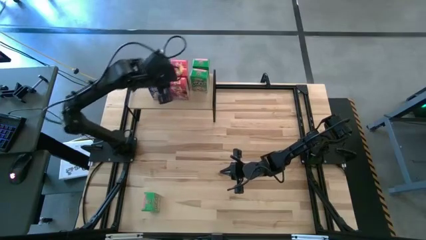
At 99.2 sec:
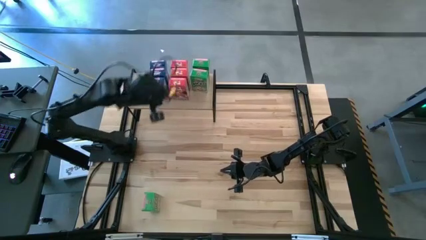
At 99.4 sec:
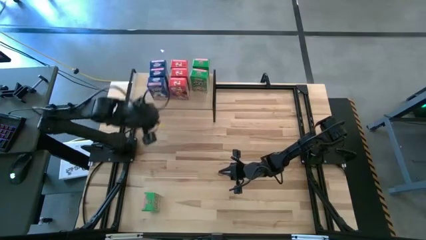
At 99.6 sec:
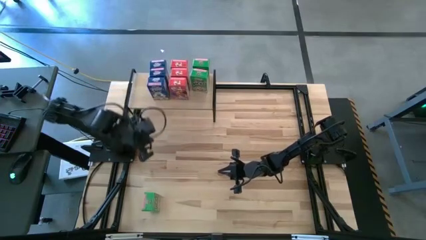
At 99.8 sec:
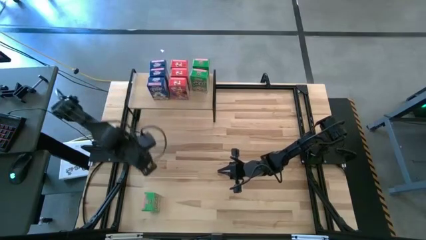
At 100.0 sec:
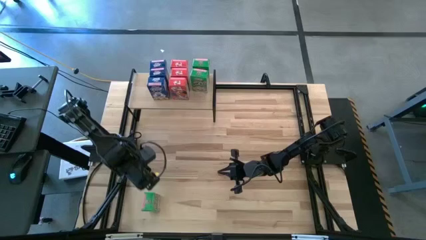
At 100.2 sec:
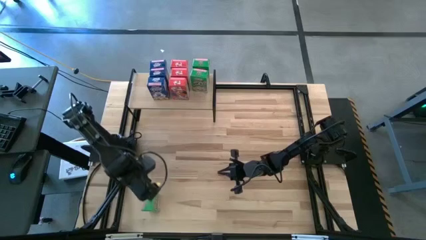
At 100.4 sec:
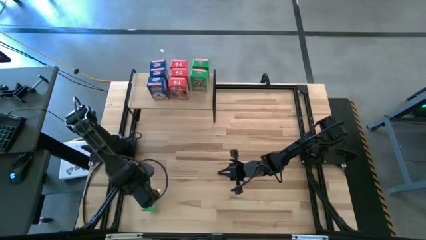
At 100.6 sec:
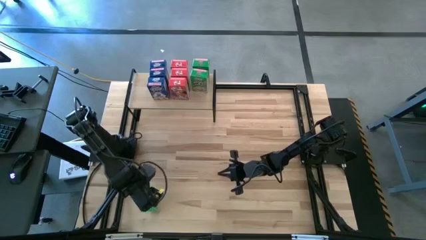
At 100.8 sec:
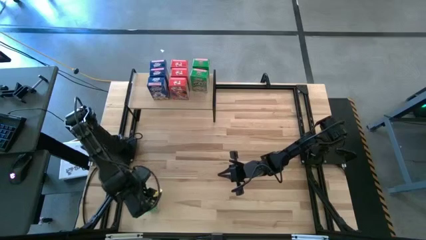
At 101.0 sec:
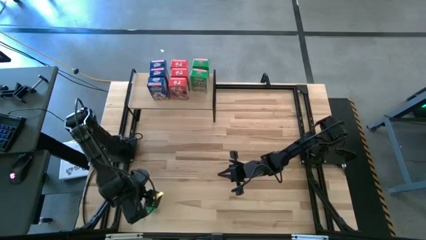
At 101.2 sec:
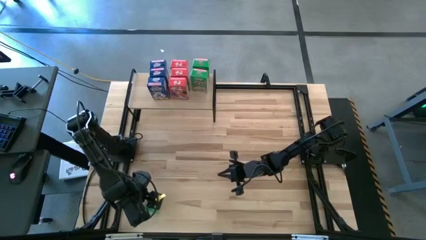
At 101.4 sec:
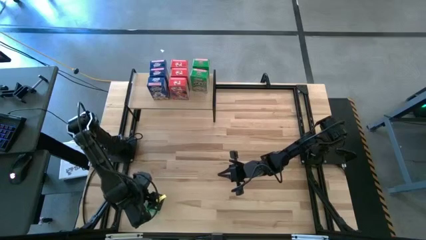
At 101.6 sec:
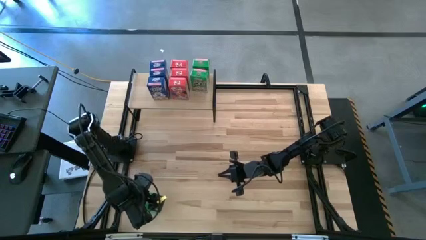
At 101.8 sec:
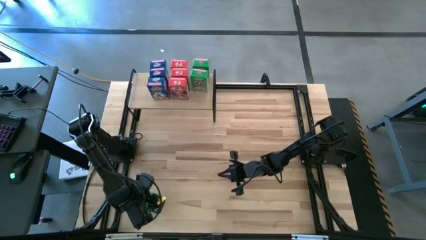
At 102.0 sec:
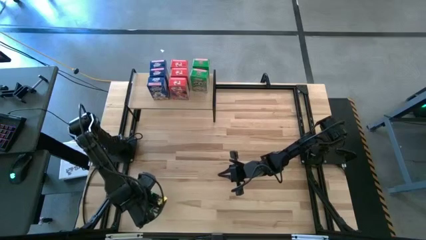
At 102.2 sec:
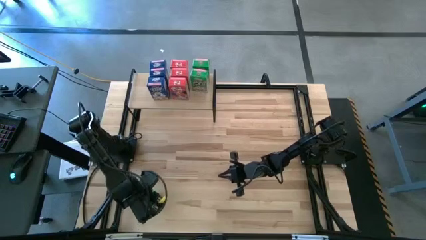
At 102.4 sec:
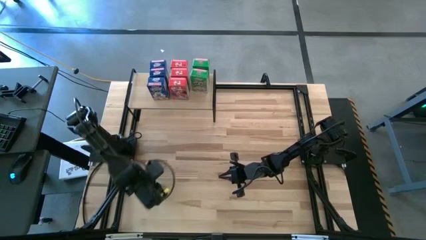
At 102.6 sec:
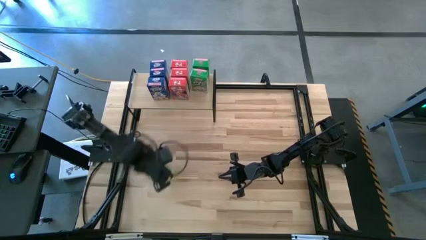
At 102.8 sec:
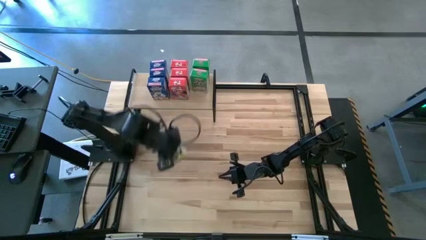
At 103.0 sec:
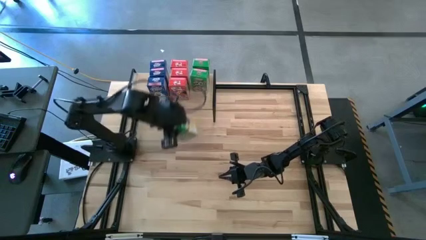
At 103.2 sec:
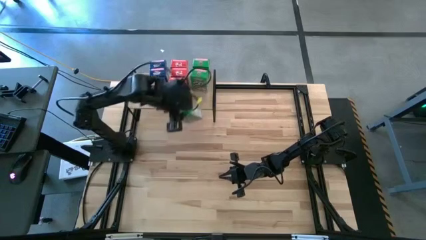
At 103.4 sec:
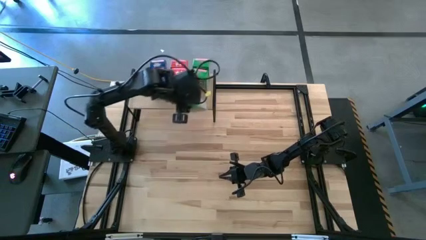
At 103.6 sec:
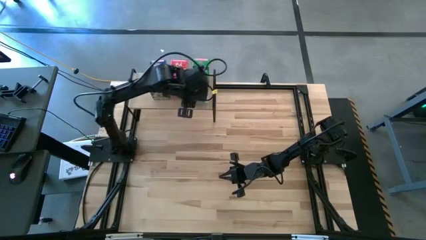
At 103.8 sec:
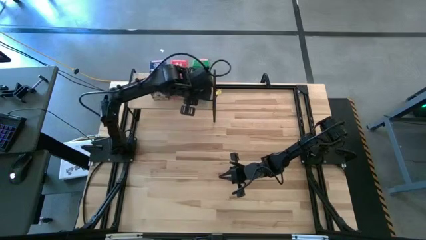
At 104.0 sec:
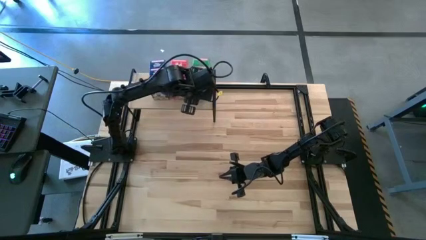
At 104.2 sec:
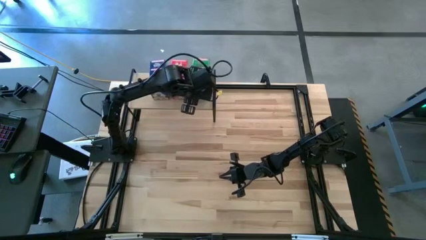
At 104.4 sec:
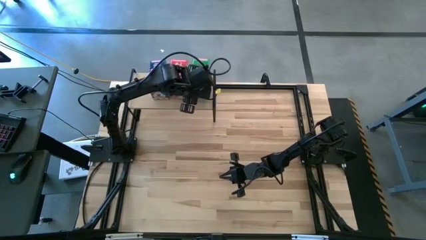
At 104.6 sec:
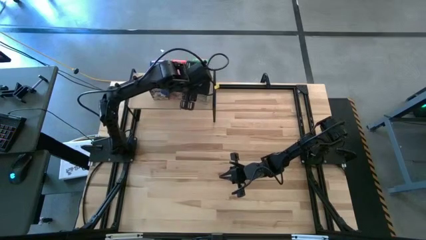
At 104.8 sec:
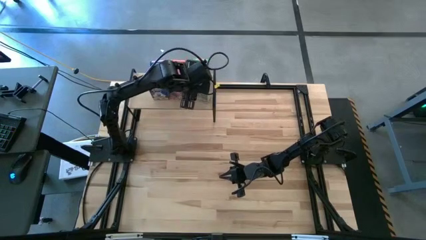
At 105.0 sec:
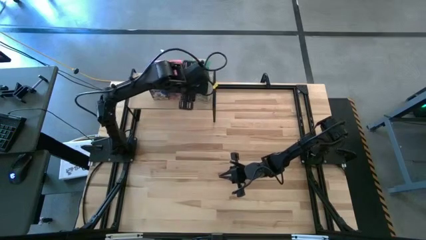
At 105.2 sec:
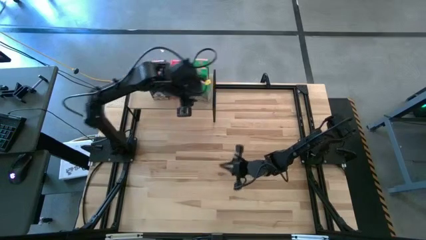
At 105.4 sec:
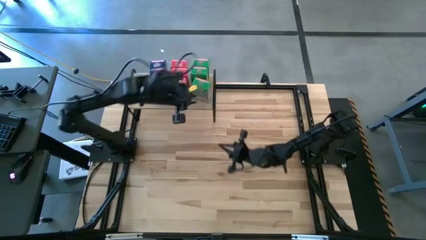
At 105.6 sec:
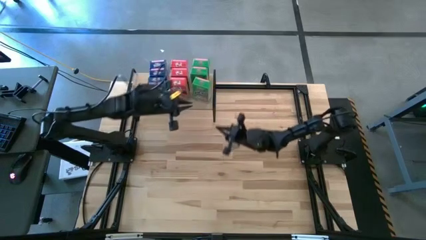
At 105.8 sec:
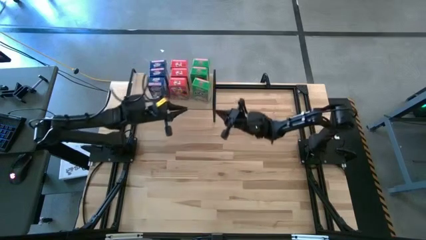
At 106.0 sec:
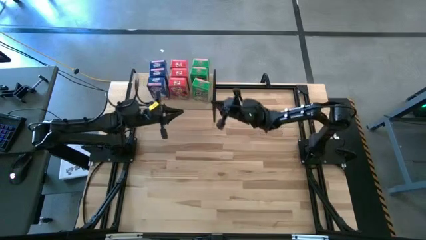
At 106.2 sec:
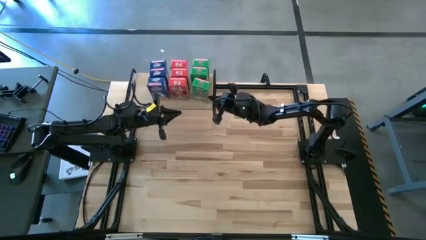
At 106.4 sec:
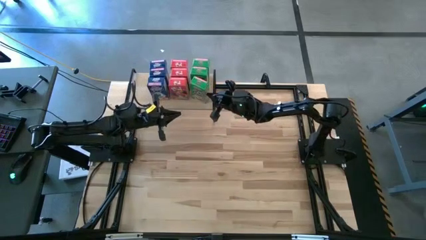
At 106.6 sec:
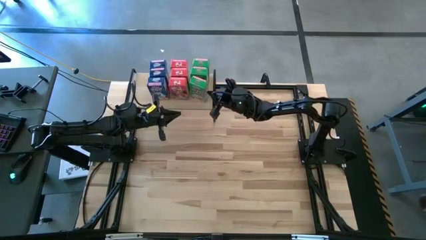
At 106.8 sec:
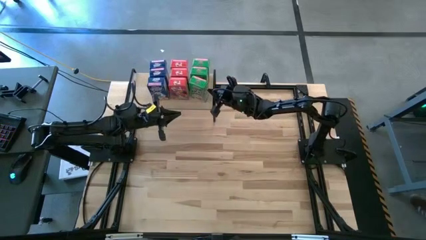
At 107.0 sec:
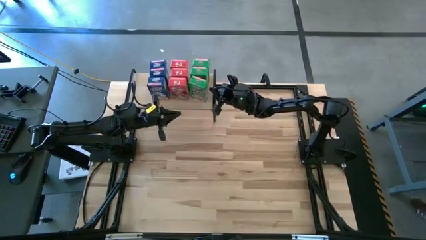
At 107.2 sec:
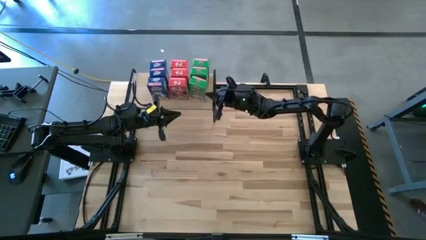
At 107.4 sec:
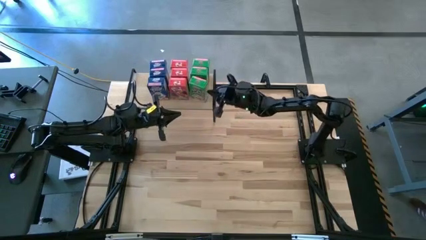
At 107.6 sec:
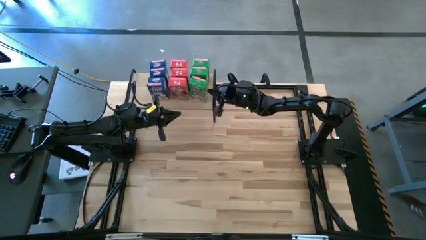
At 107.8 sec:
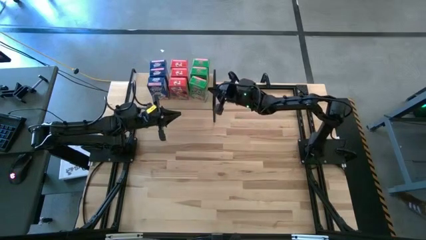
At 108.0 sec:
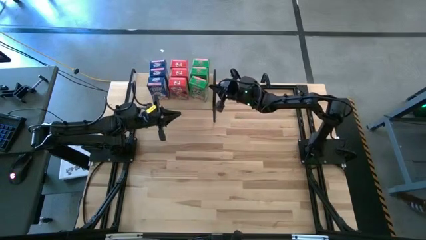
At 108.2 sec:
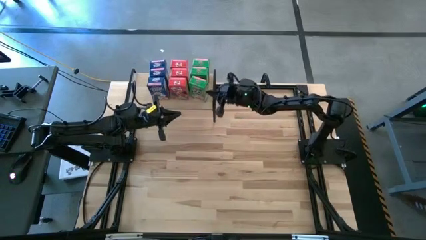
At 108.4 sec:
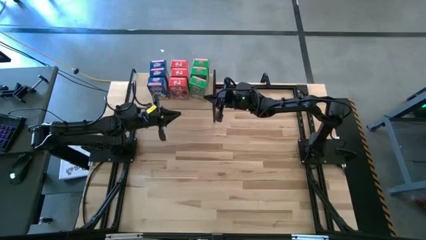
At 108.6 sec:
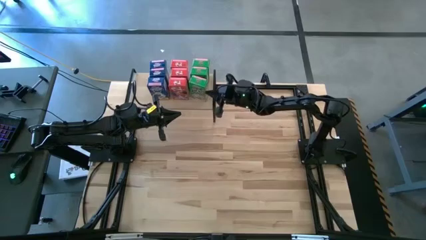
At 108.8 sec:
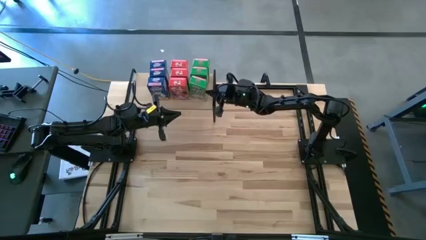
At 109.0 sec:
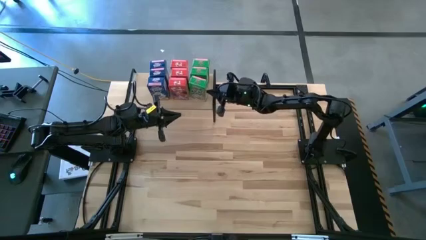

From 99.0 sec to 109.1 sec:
Task: Stack cereal on shelf
Put the green cereal box on the shelf aligned with the other green cereal boxes

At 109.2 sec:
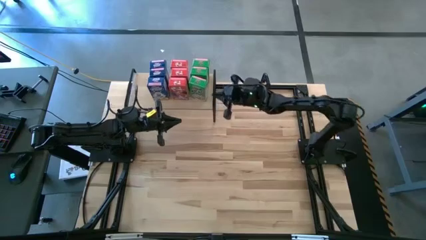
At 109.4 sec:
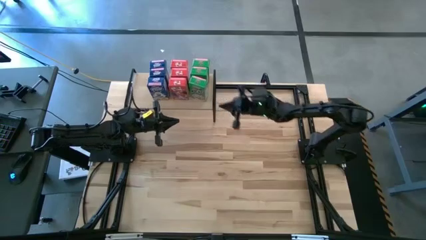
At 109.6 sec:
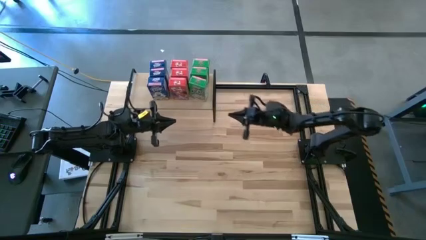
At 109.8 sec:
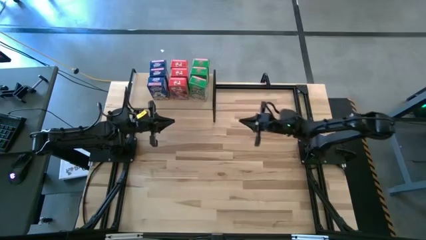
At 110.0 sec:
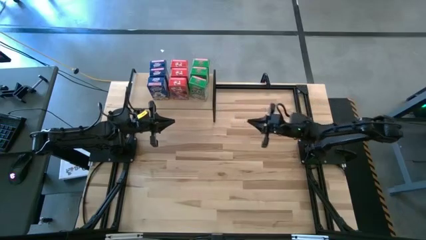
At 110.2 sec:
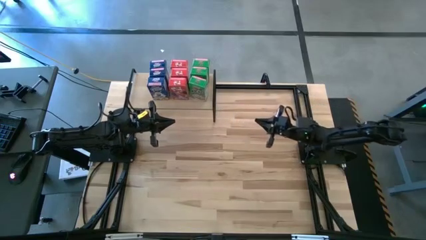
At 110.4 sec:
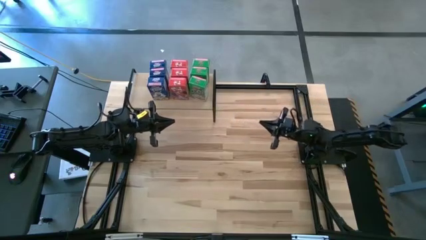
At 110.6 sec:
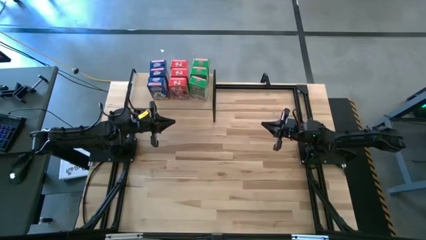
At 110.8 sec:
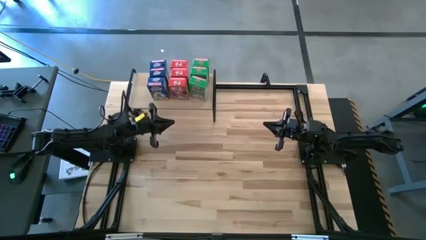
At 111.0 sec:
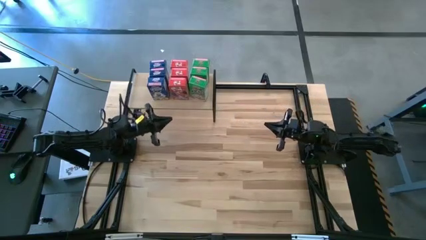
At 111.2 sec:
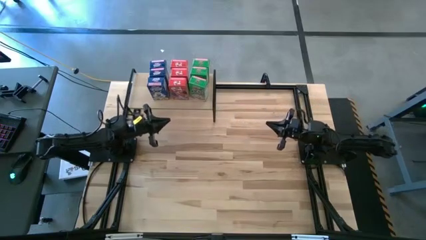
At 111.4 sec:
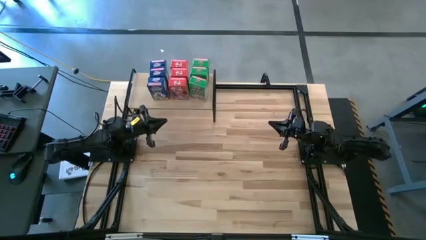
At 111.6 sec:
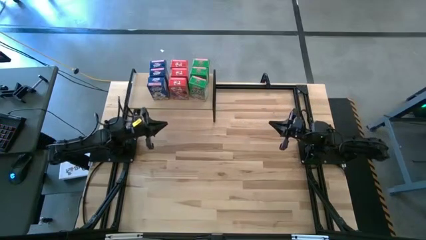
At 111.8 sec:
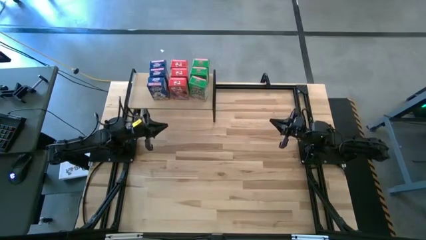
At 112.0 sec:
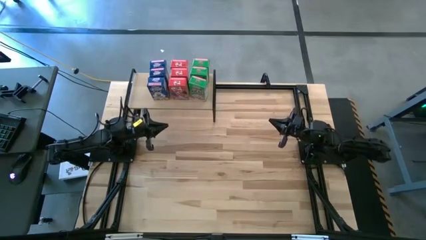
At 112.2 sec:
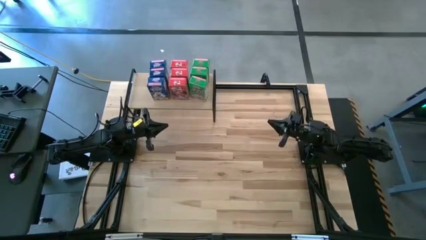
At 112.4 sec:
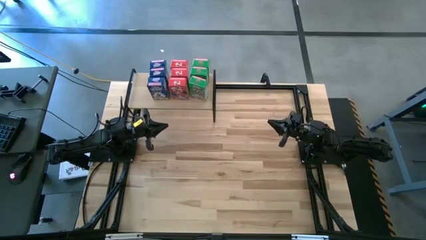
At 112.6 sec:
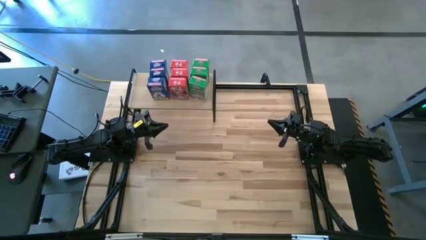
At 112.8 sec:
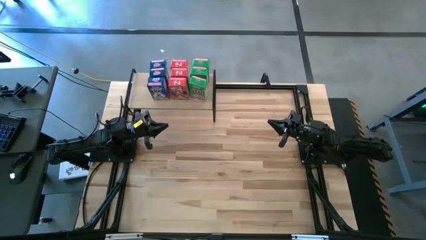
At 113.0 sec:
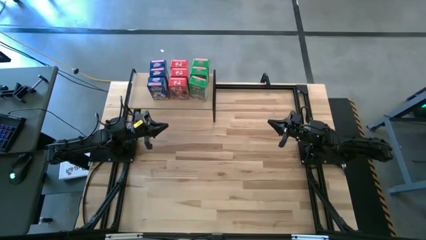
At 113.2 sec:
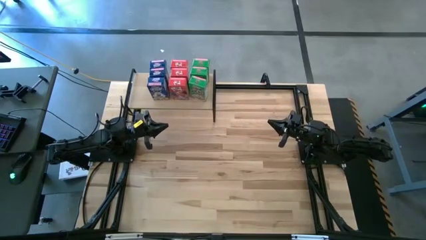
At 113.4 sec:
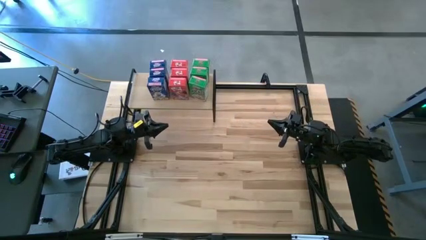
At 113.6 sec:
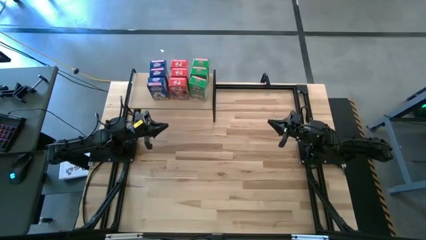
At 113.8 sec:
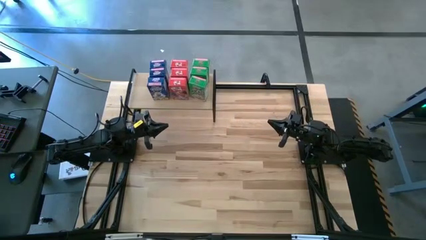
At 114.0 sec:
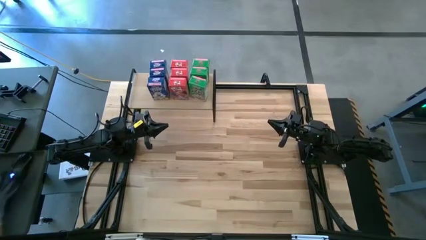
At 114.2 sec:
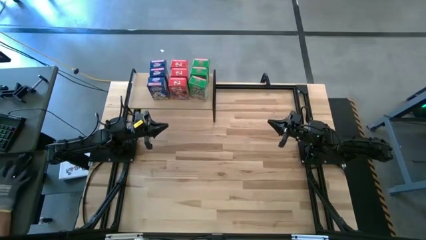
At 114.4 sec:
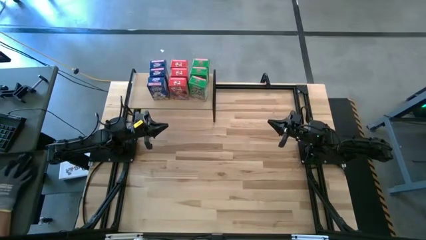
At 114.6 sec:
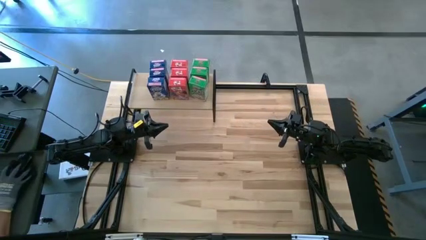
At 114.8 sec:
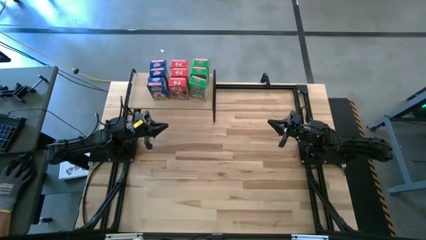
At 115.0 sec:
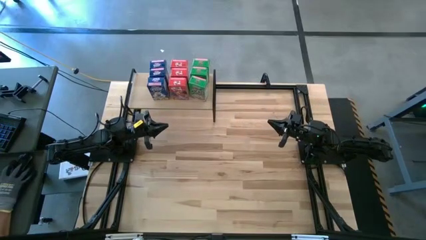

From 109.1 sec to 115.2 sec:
Return to Home Position
